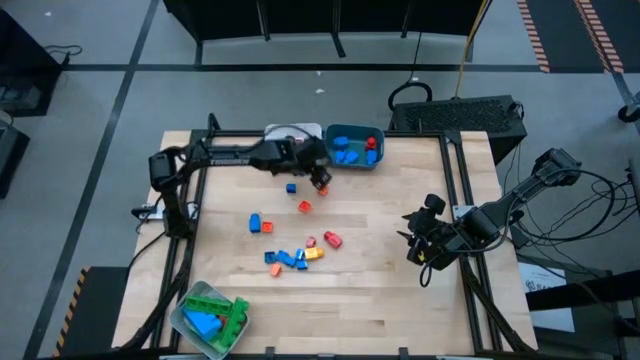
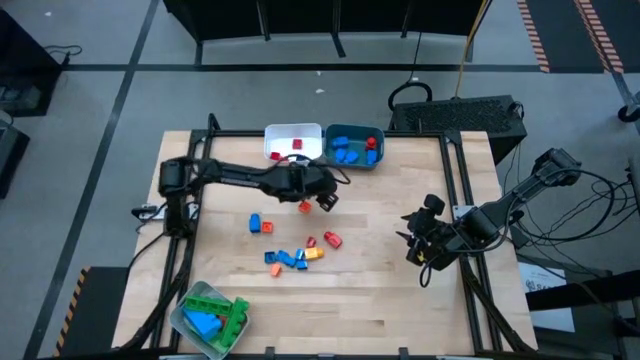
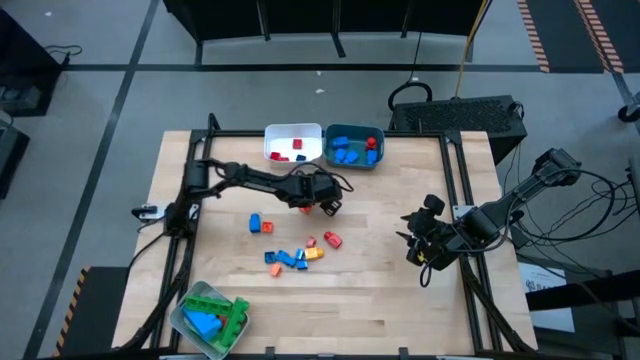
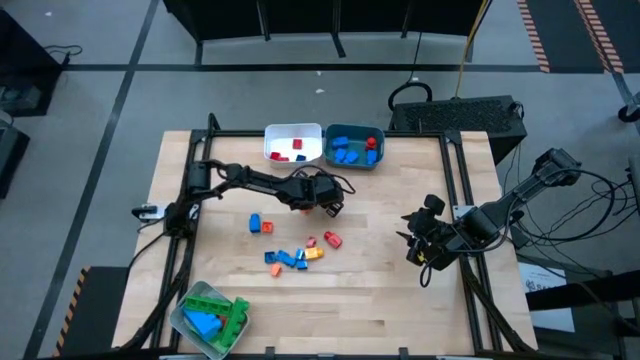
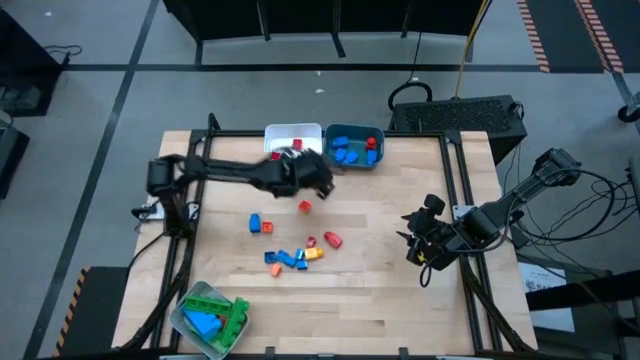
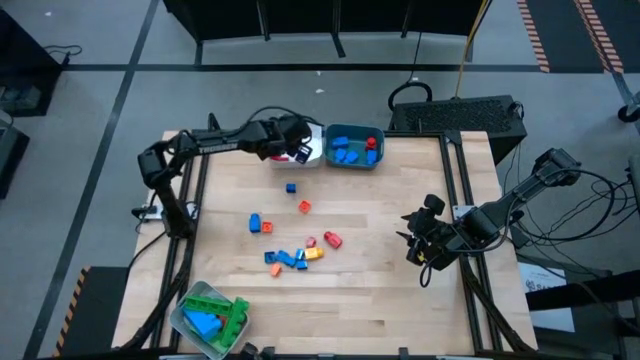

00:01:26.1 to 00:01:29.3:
Task: Sort blocks by size
Put the orange cube 4 stud game piece into the white bin

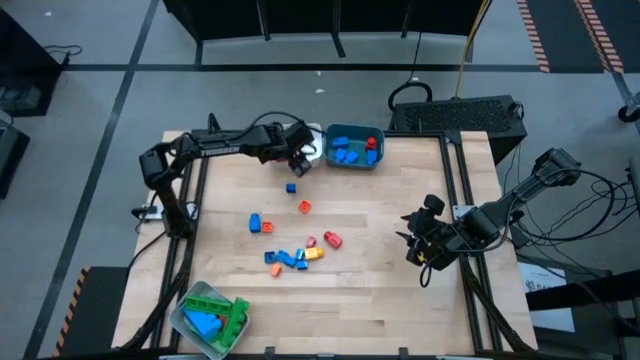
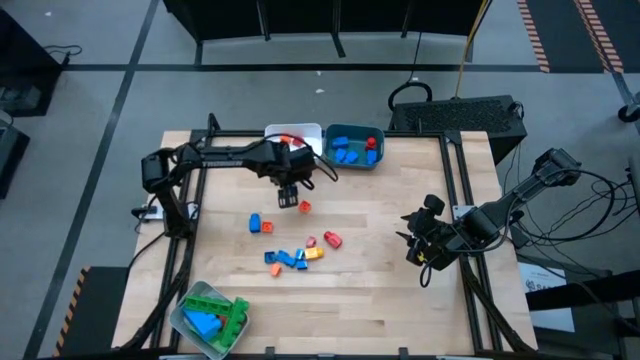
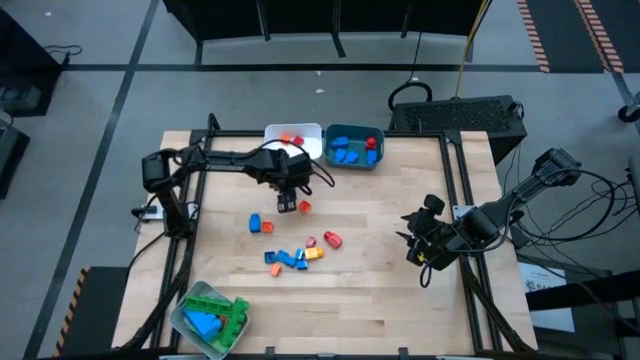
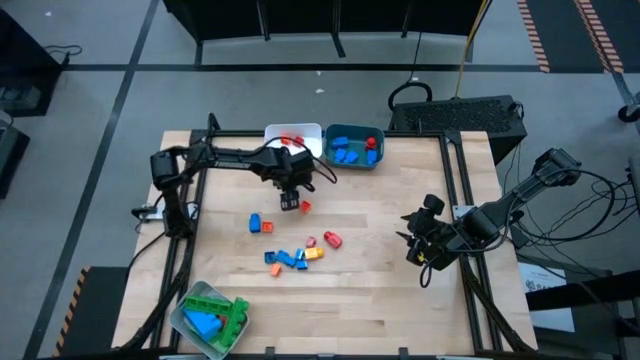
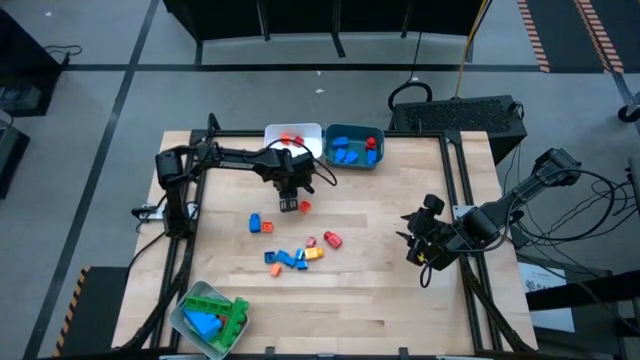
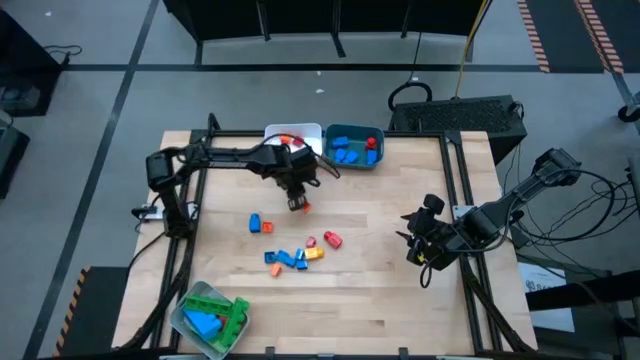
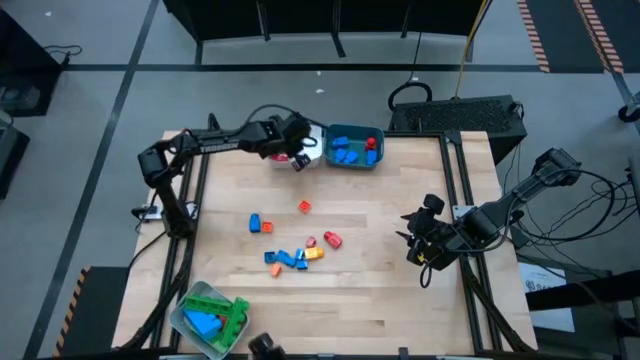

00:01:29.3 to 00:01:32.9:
Put the blue cube 4 stud game piece into the white bin

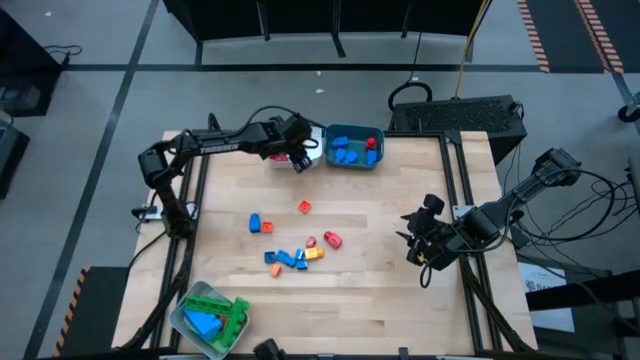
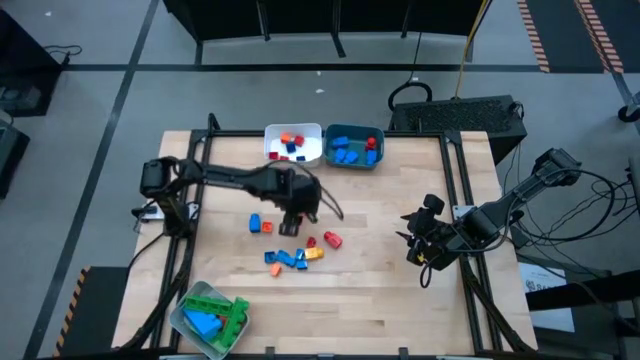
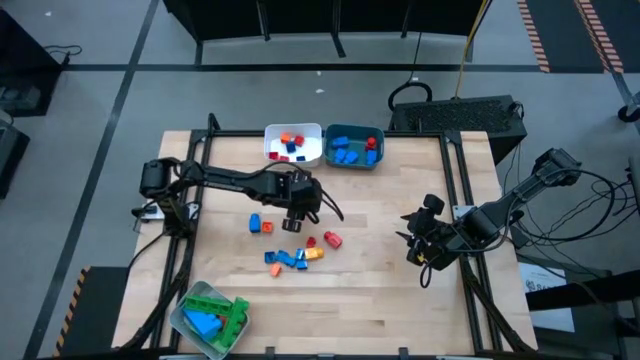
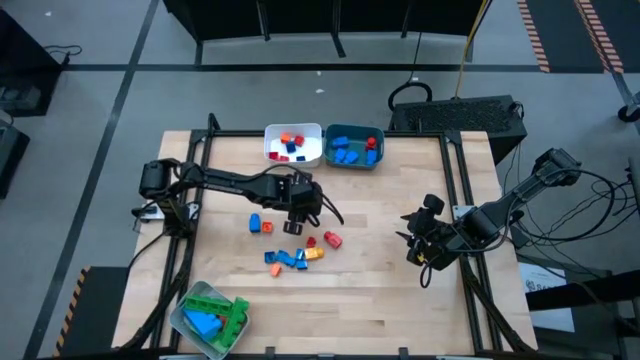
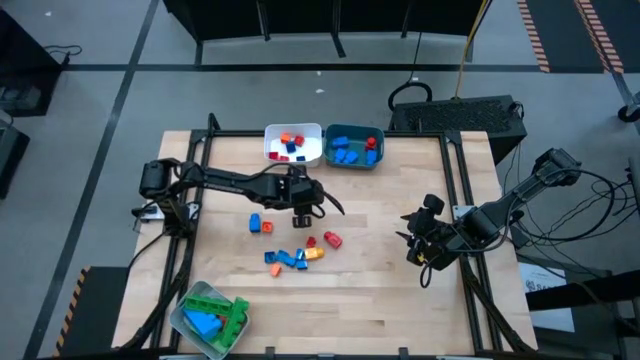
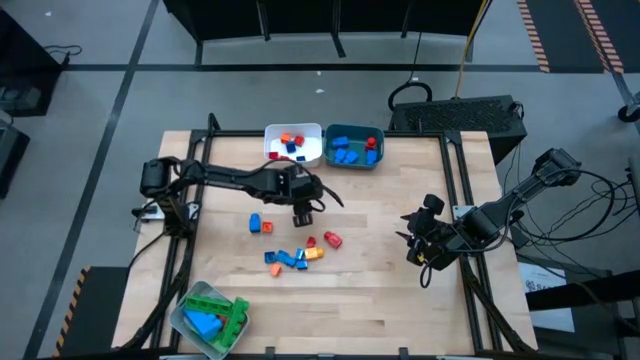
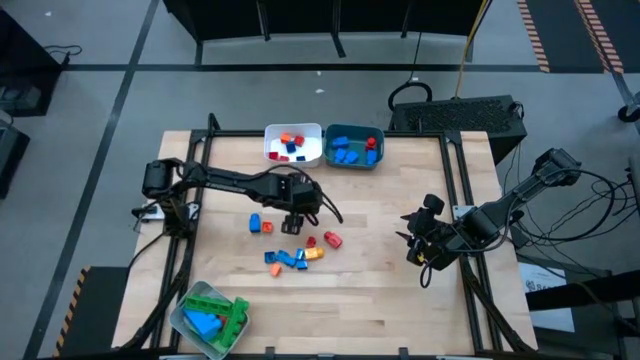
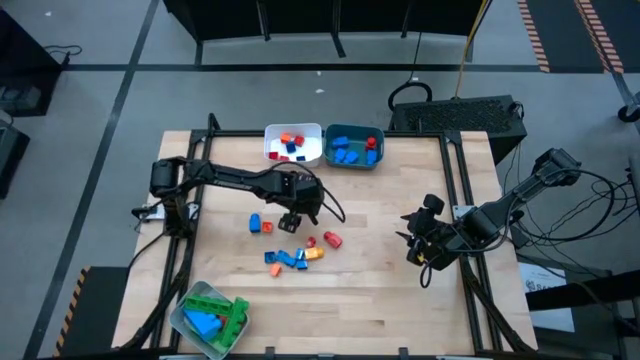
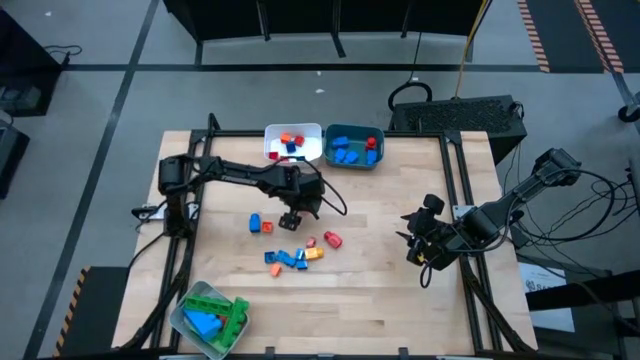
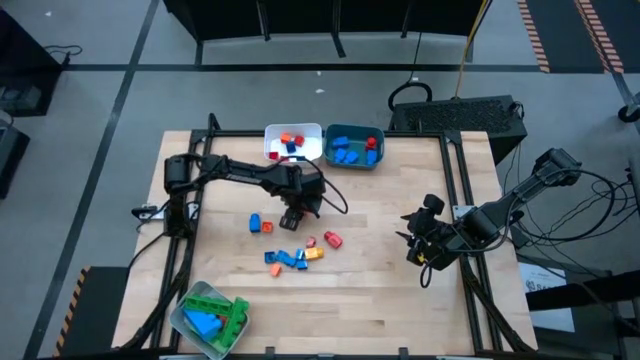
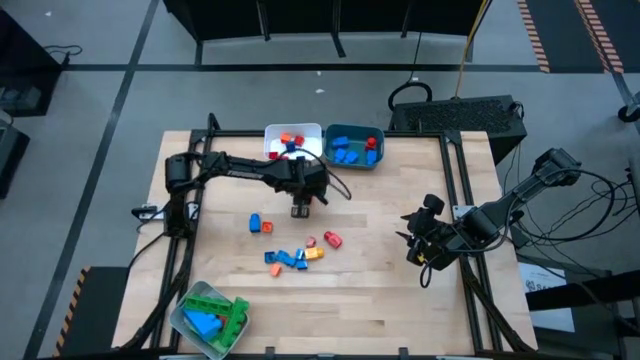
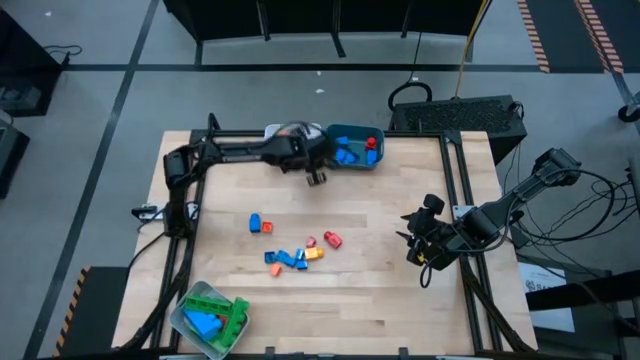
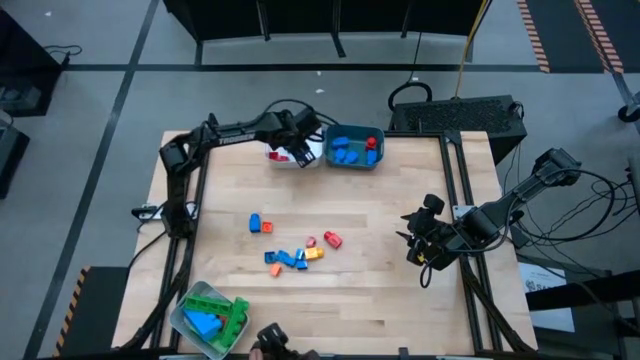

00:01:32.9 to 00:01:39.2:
Put the orange cube 4 stud game piece into the white bin

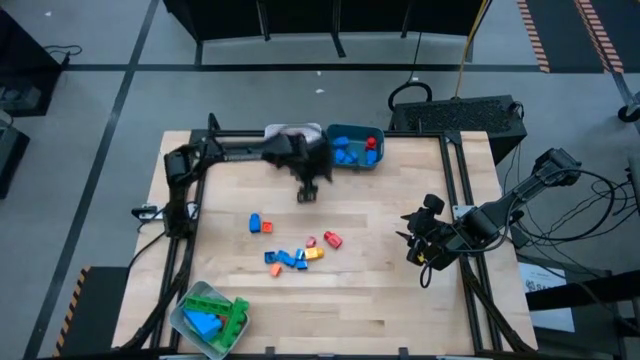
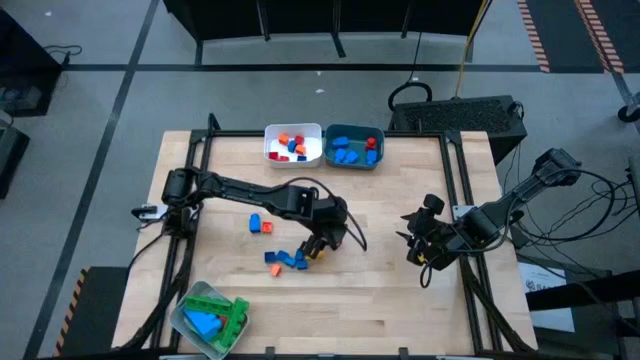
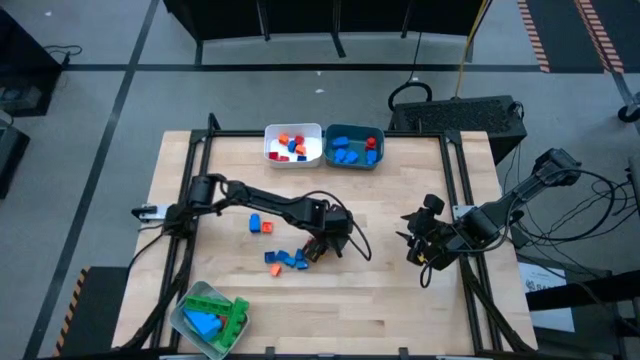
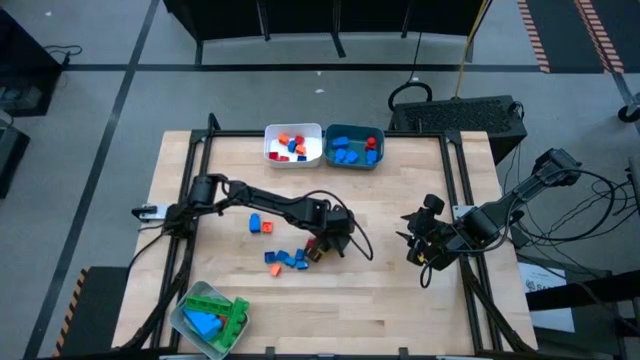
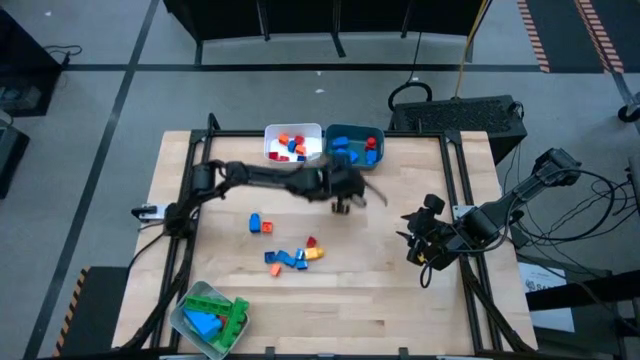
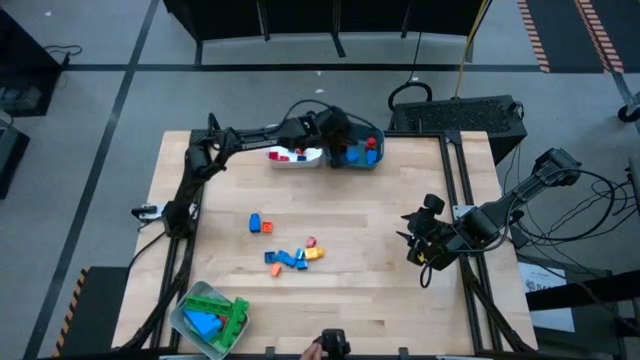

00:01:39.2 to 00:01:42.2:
Put the red 1 stud game piece into the blue bin

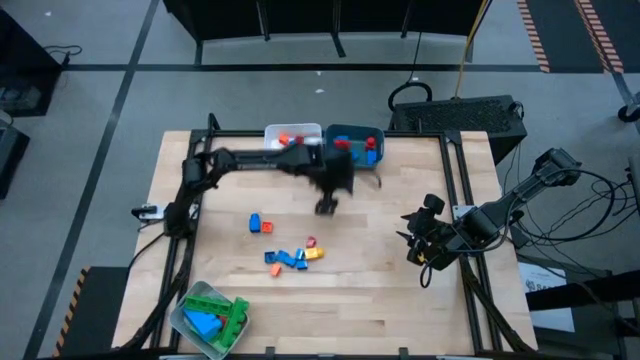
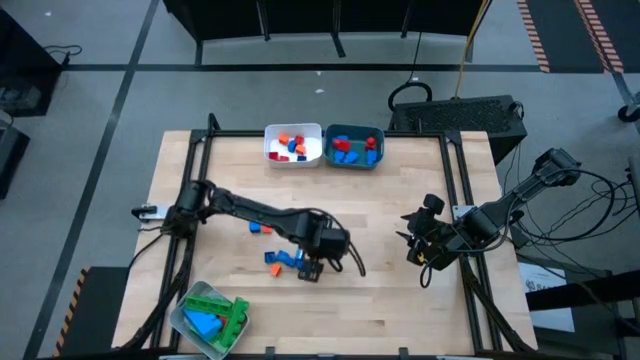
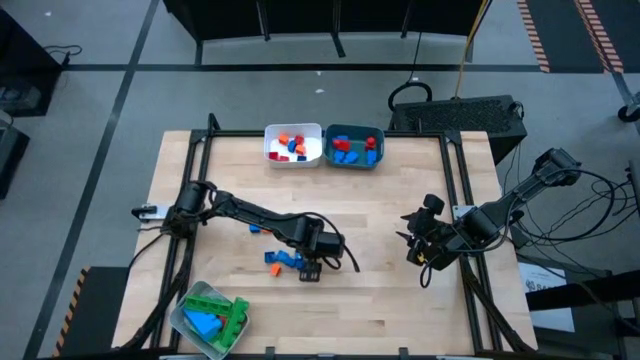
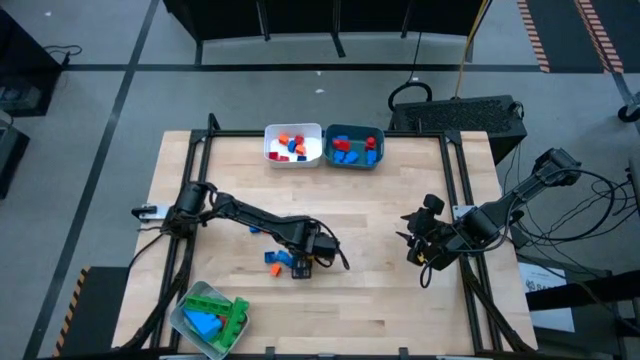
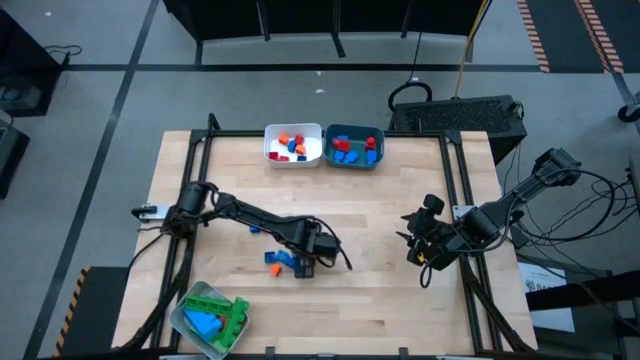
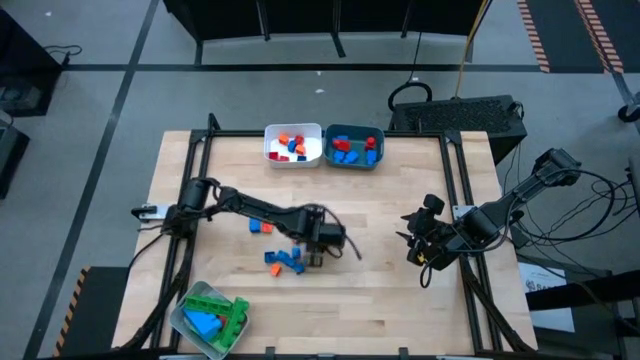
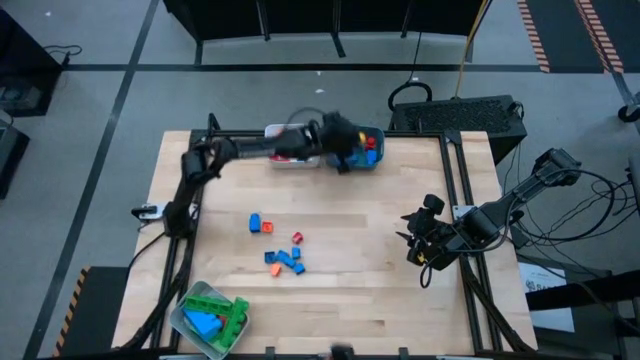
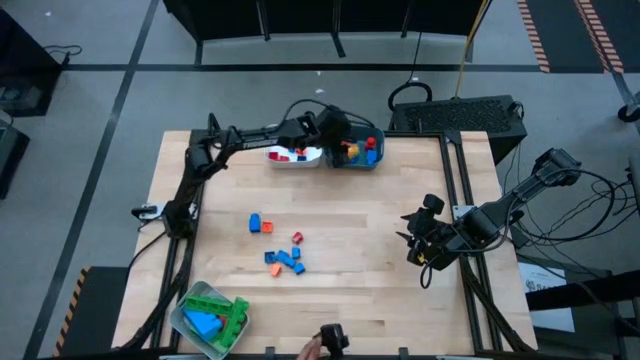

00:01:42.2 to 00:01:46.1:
Put the yellow 1 stud game piece into the blue bin

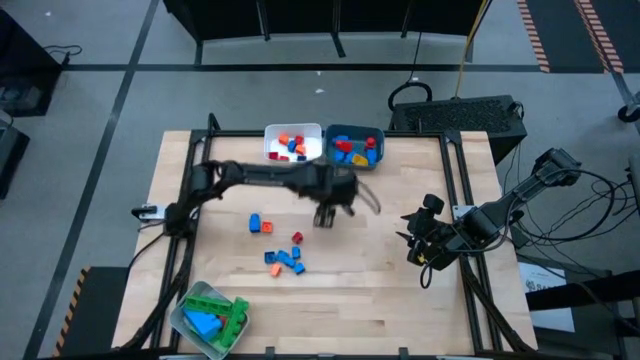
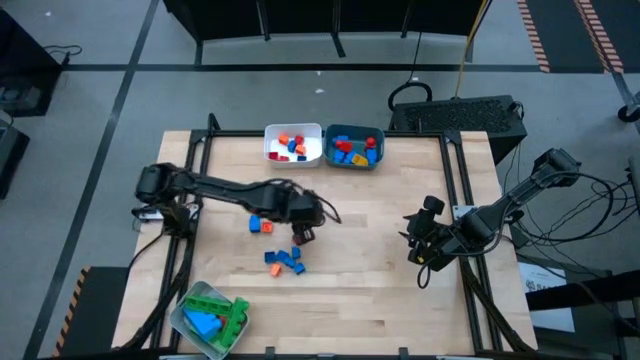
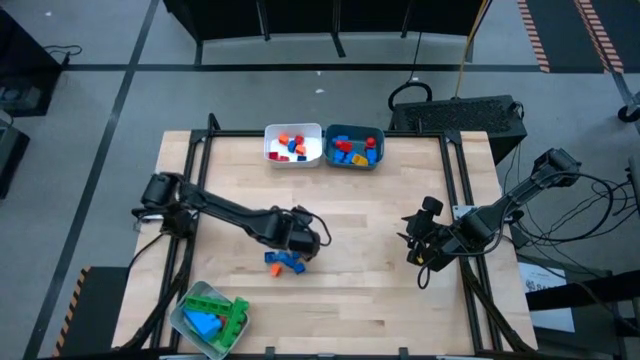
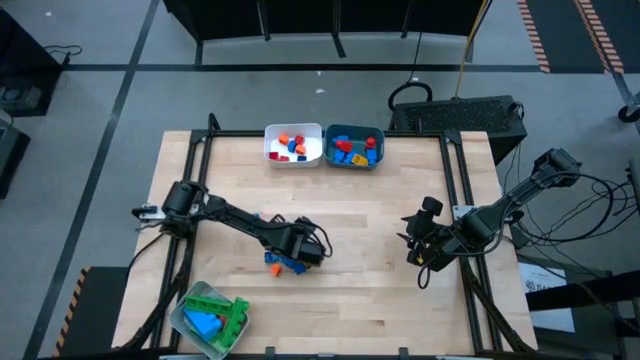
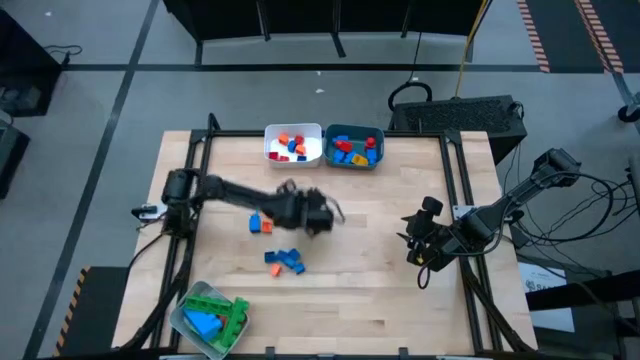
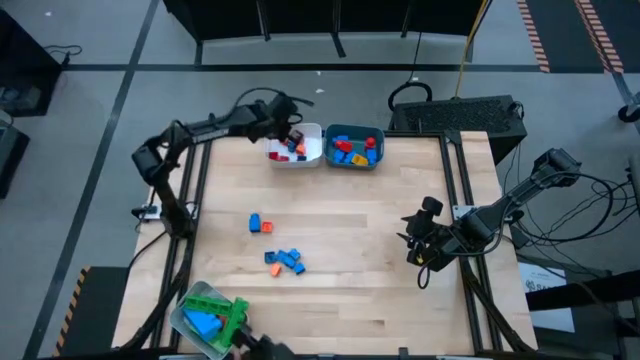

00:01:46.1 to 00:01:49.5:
Put the red cube 4 stud game piece into the white bin
